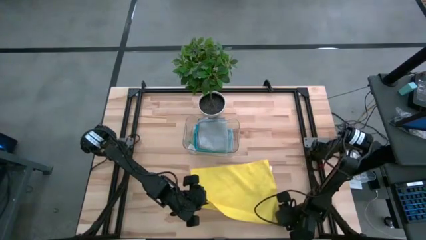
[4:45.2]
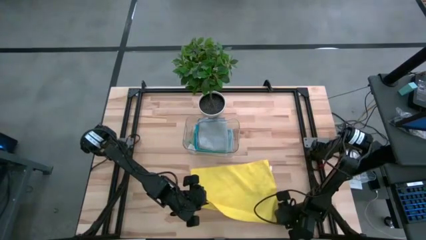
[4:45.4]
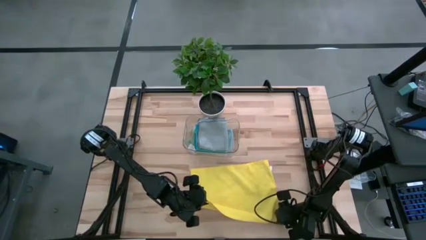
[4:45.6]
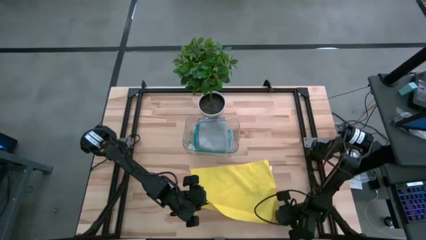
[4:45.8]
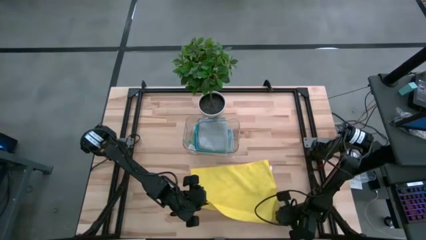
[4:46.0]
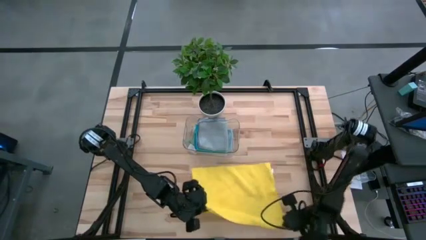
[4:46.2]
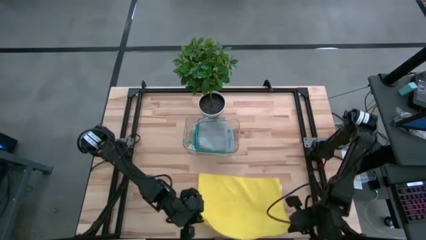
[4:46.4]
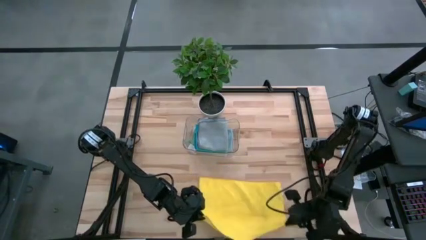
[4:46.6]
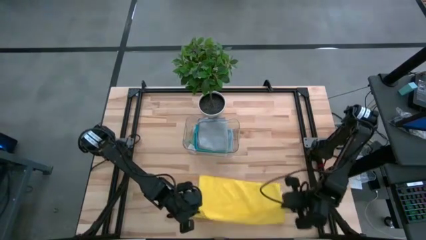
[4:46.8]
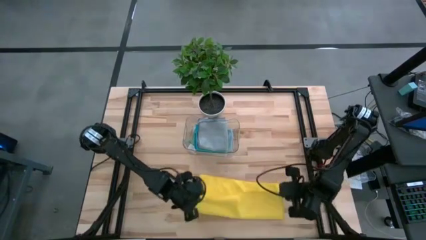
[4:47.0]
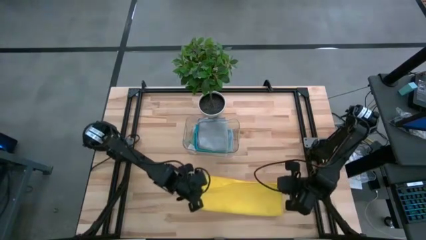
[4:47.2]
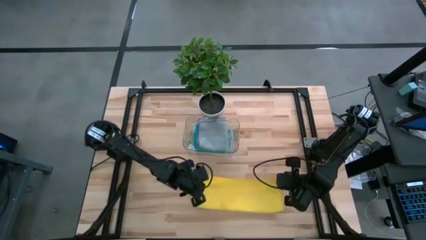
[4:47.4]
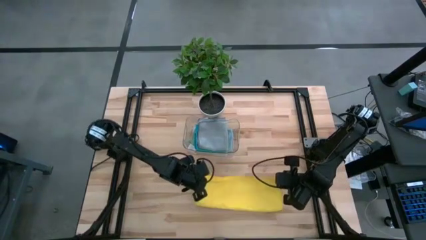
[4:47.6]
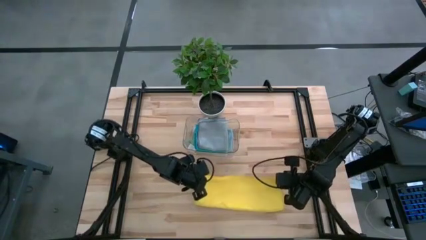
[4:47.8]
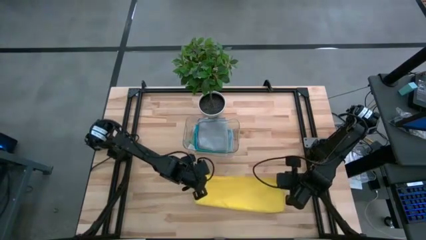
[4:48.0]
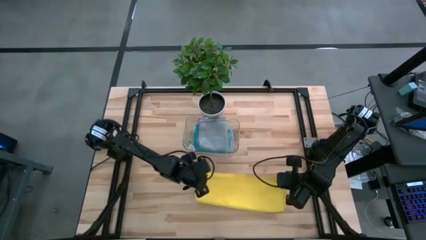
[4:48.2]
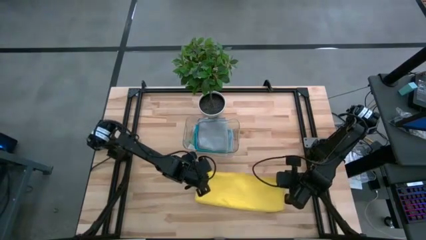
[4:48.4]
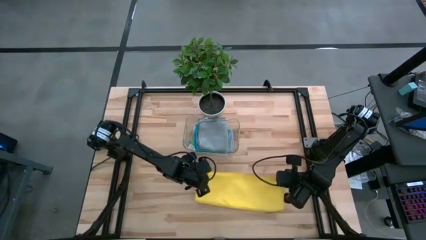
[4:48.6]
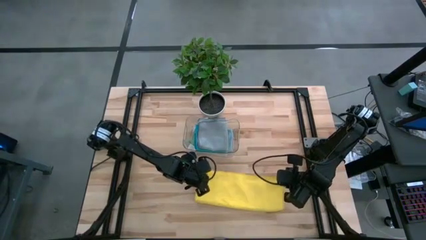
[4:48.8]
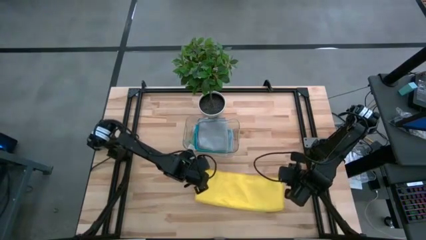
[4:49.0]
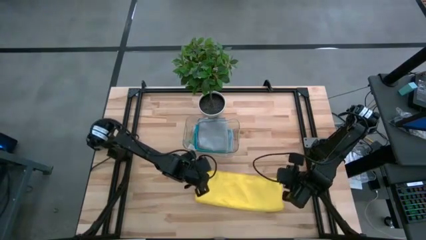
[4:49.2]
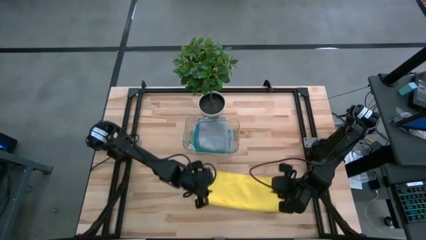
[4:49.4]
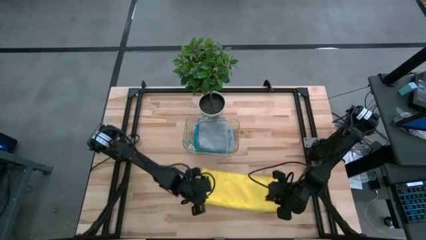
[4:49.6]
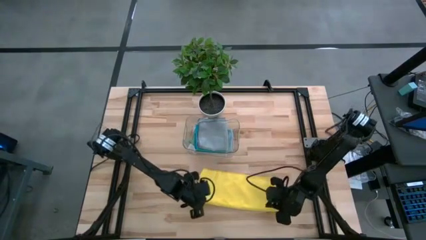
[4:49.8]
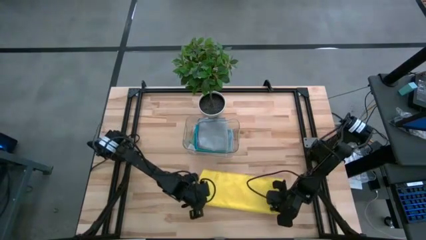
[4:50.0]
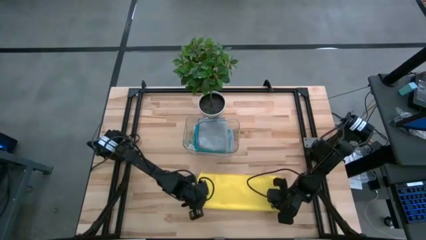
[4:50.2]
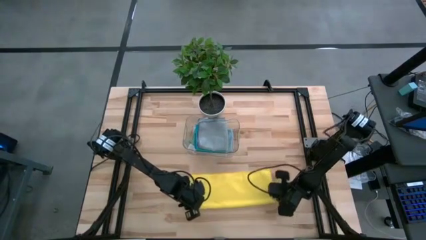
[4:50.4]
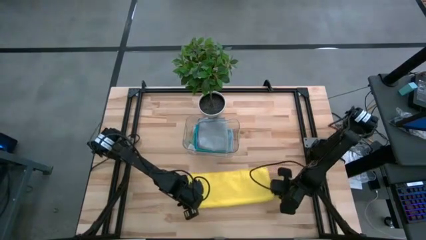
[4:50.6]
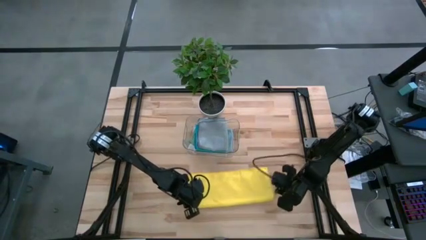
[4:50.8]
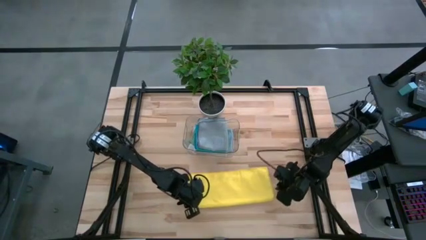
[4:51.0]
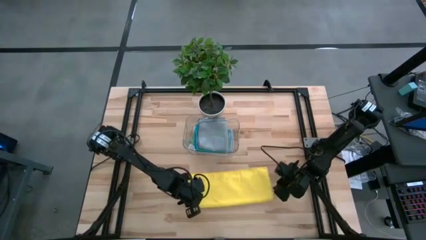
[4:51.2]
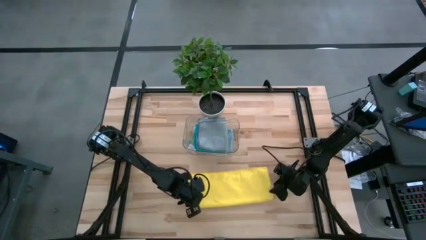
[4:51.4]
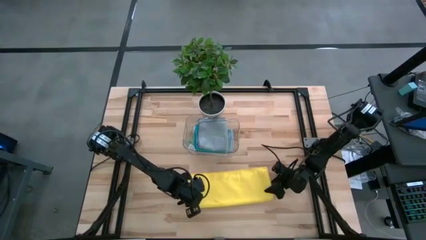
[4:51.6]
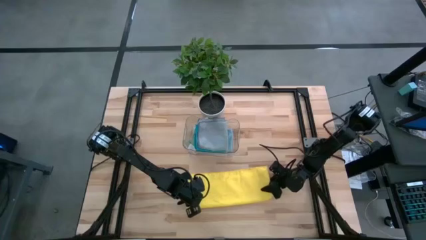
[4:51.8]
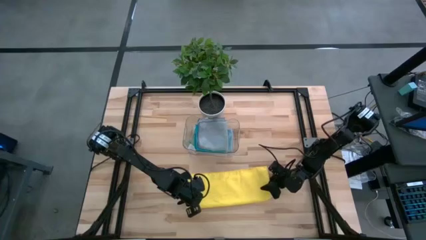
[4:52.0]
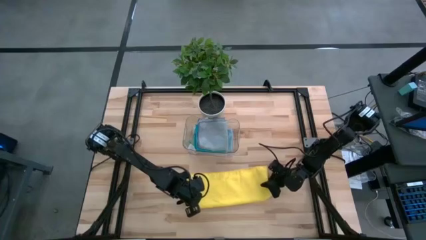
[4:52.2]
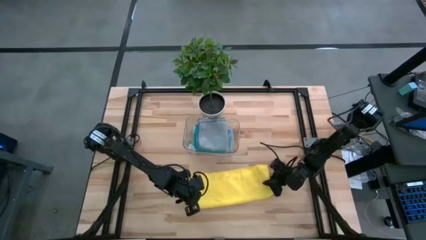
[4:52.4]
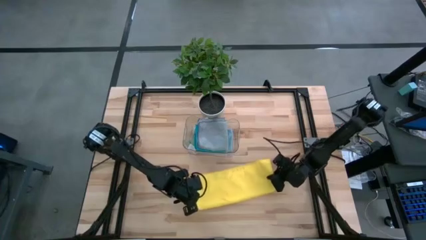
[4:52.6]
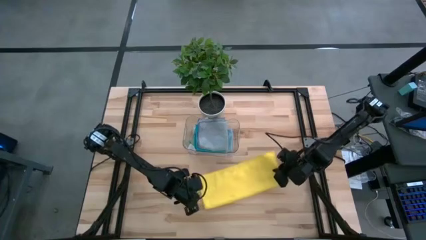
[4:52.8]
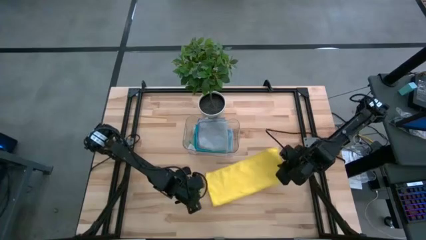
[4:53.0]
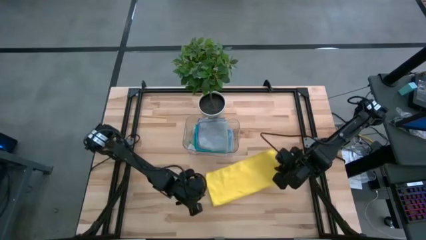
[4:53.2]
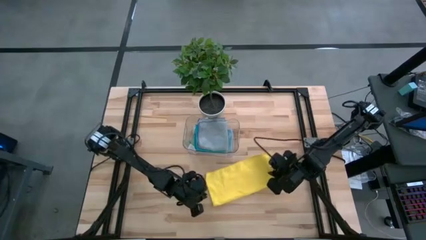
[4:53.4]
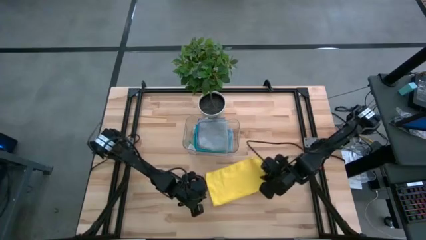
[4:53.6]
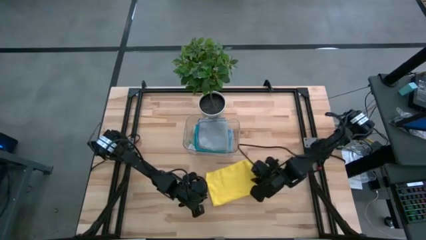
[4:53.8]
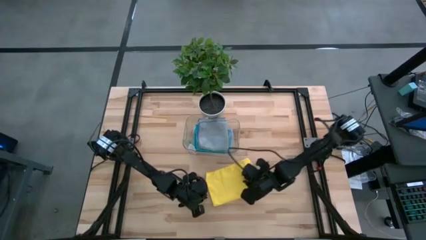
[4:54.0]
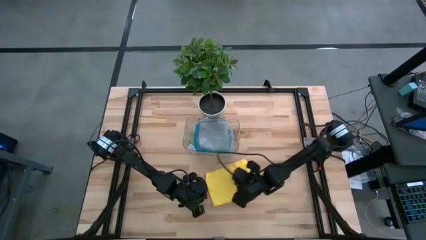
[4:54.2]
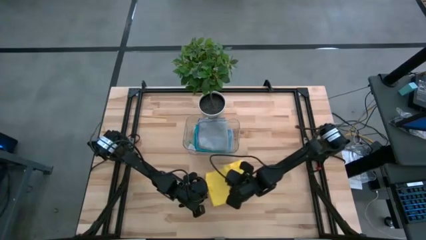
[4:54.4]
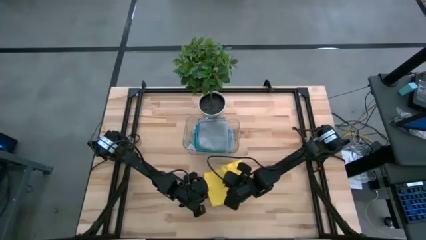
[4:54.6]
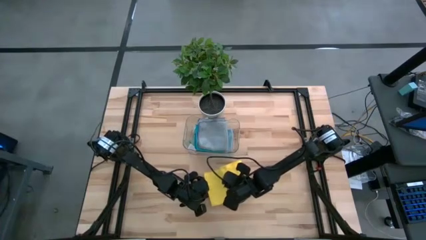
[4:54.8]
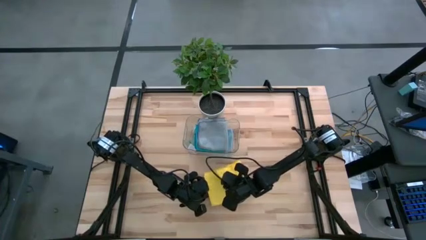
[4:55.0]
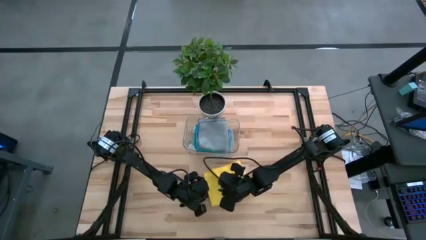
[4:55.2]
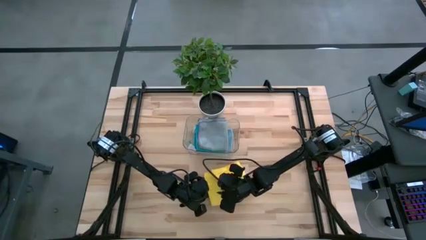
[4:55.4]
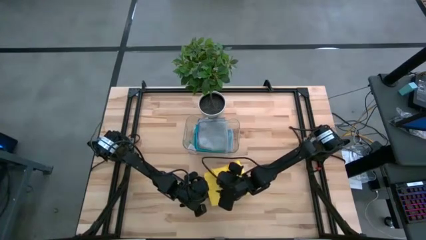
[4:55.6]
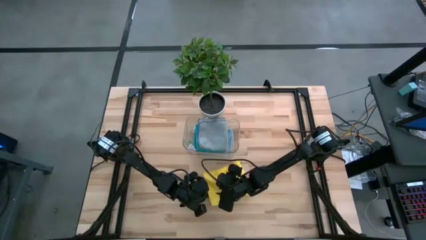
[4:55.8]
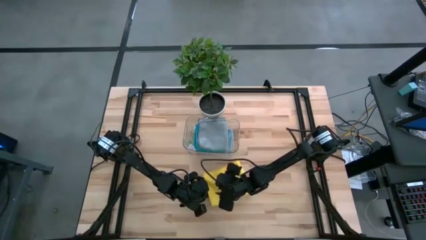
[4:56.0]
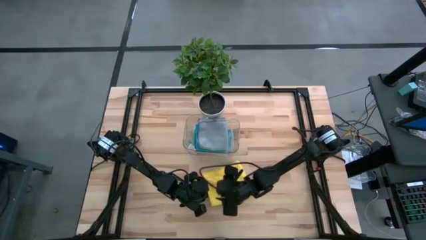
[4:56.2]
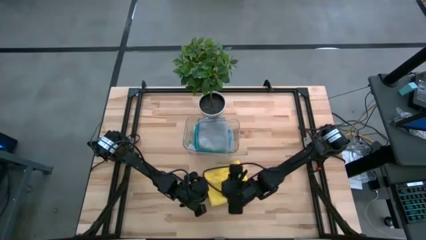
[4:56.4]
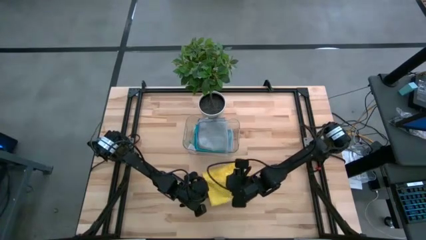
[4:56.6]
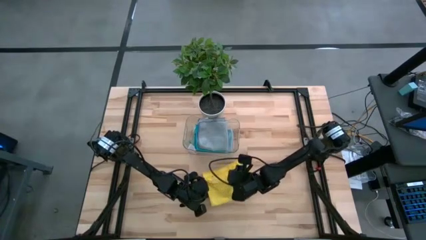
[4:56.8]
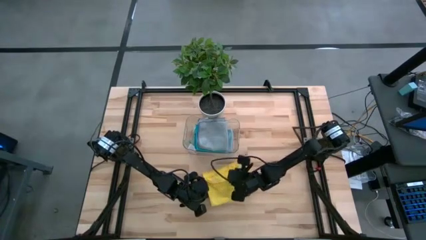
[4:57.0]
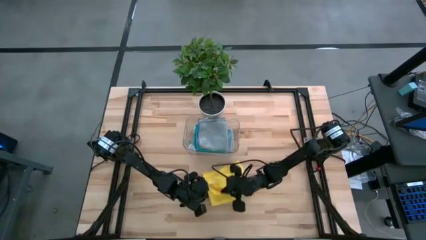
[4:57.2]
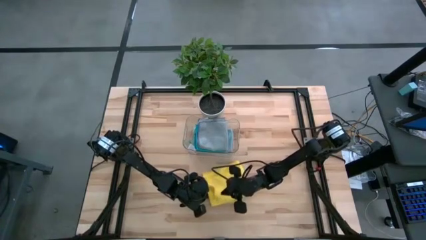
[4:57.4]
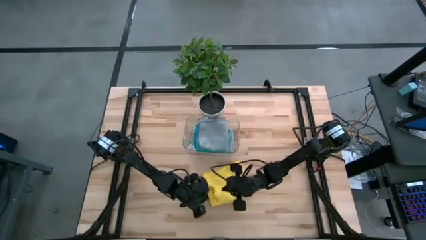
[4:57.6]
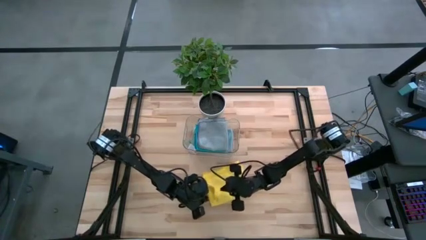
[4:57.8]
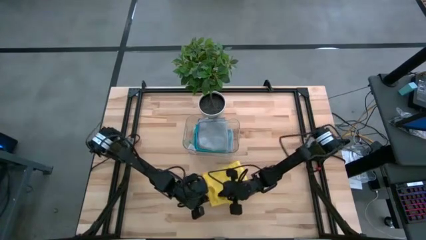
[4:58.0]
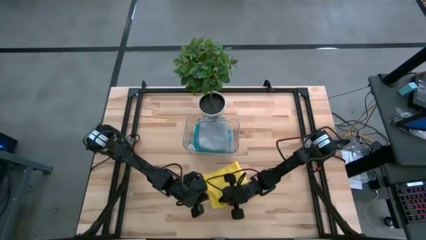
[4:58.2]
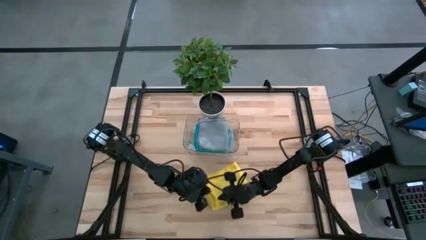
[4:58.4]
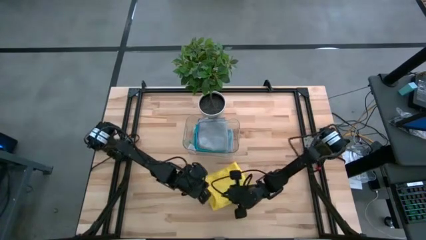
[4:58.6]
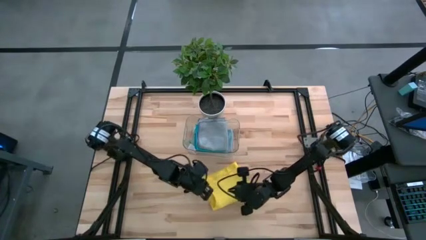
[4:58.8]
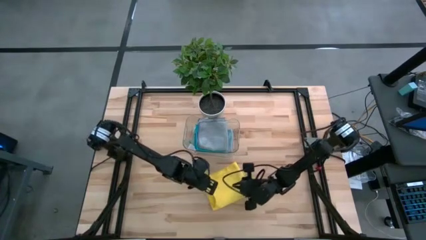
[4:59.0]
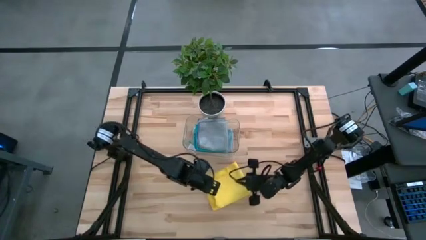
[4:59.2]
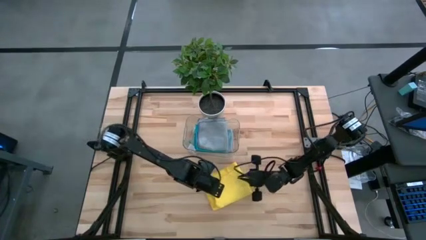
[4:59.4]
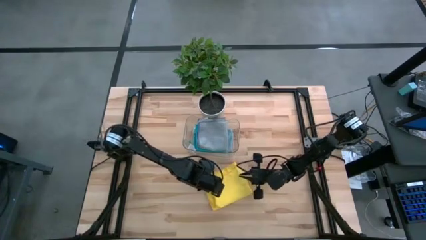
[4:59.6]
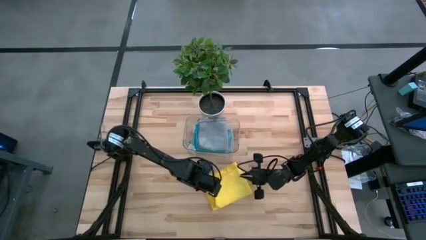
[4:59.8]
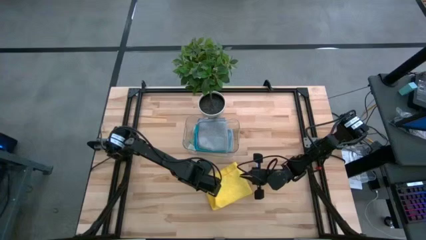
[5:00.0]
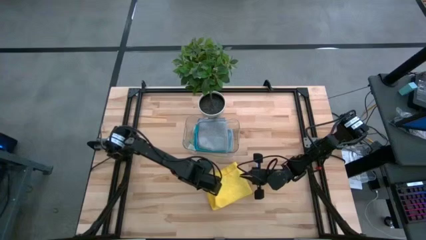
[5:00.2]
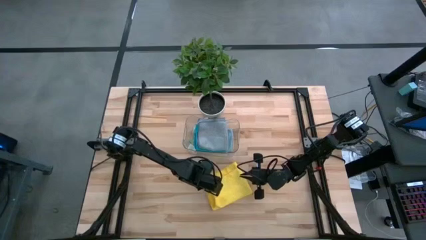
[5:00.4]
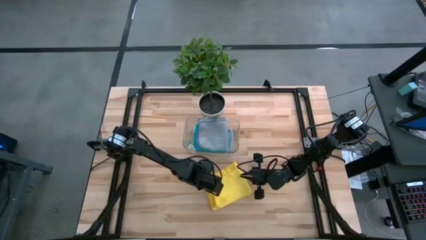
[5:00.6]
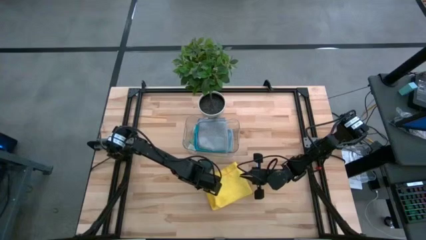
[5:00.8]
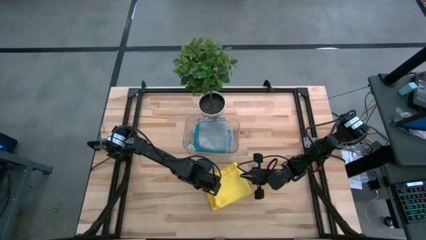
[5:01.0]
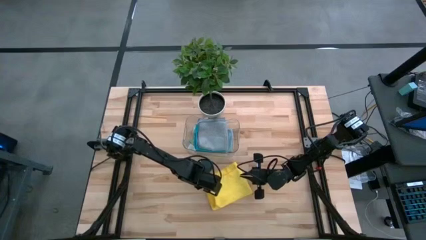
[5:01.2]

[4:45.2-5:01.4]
Task: Fold microfiber towels
Fold the yellow microfiber cloth

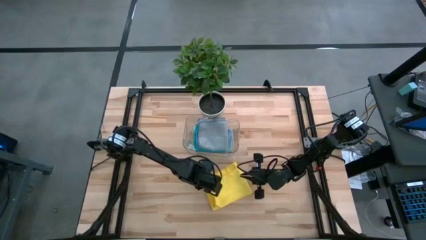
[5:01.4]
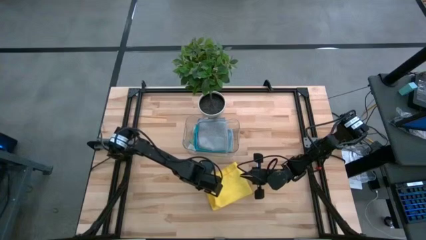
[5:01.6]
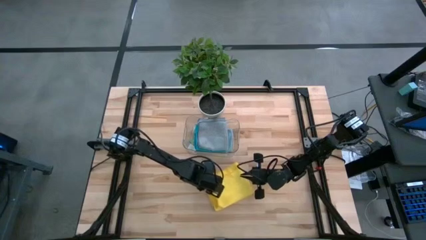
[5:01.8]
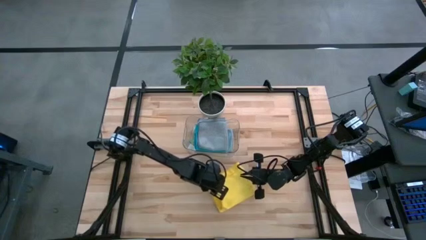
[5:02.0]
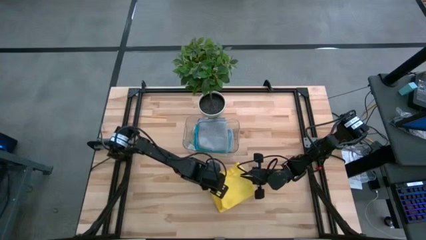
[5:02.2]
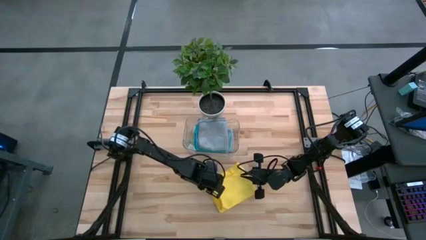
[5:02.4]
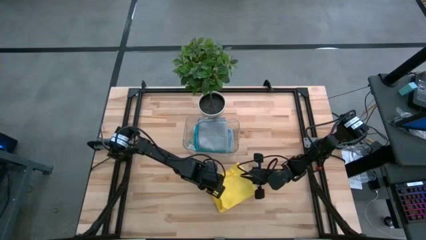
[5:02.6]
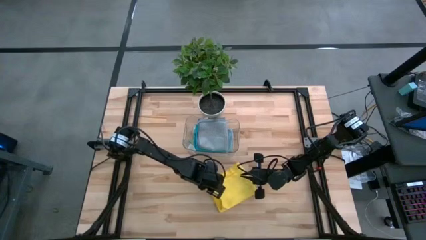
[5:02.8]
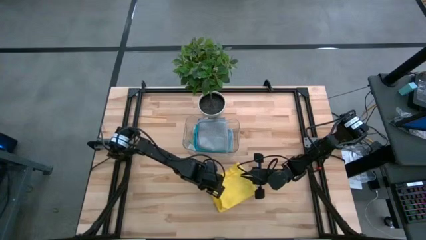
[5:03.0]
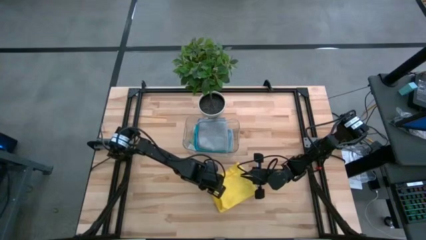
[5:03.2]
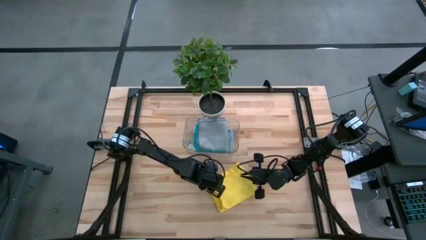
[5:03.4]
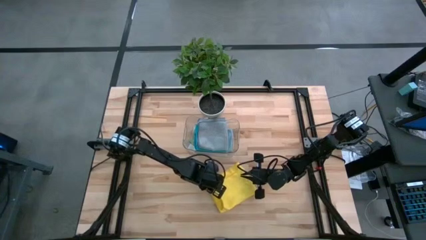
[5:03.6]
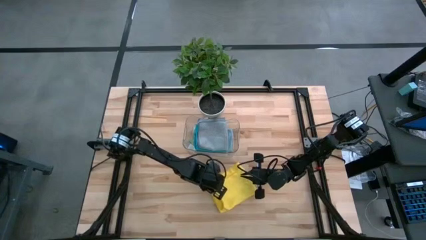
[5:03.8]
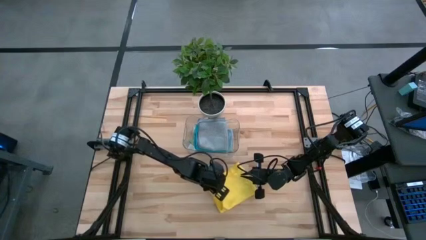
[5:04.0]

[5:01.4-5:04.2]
Fold the yellow microfiber cloth
